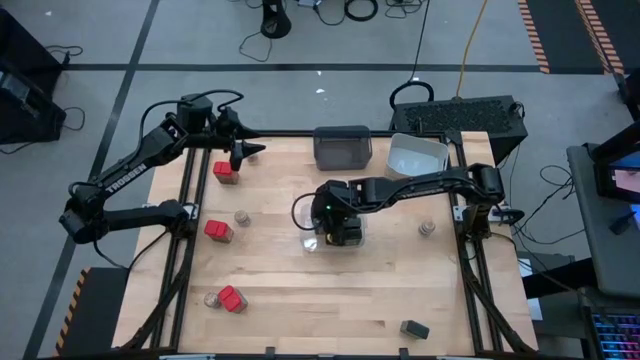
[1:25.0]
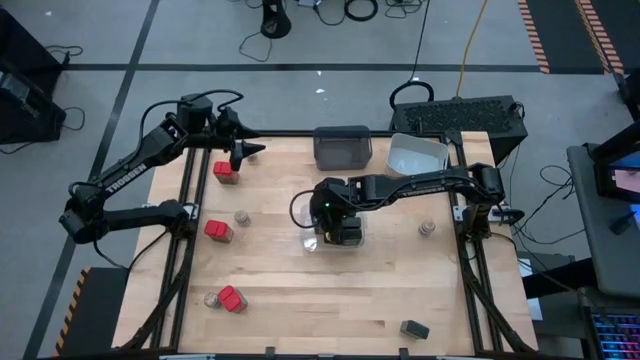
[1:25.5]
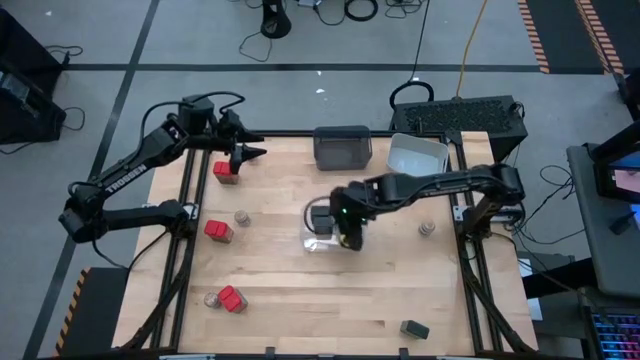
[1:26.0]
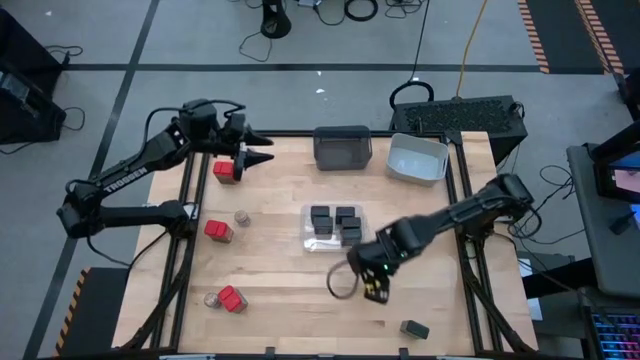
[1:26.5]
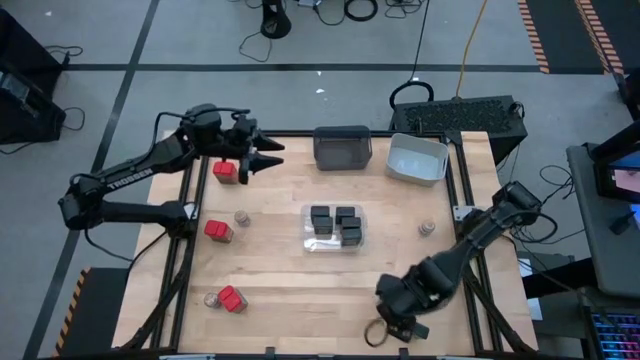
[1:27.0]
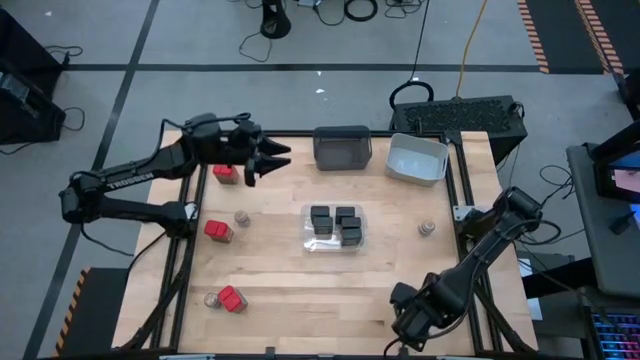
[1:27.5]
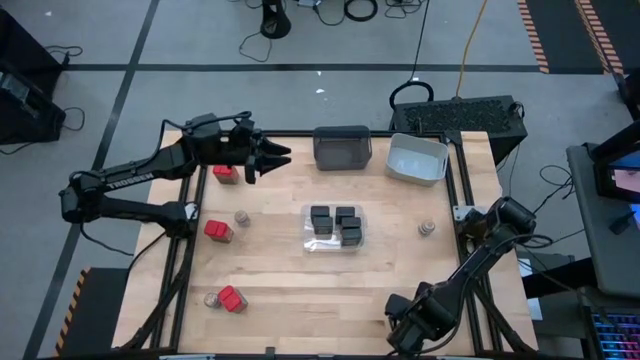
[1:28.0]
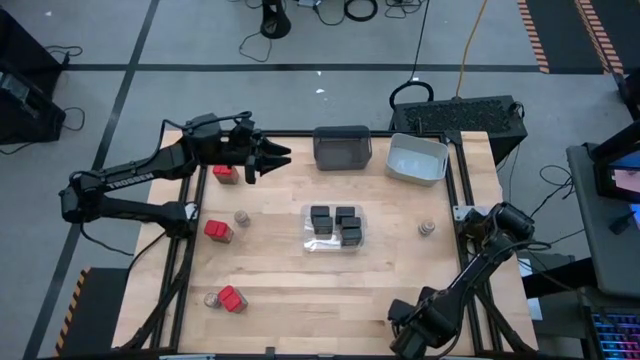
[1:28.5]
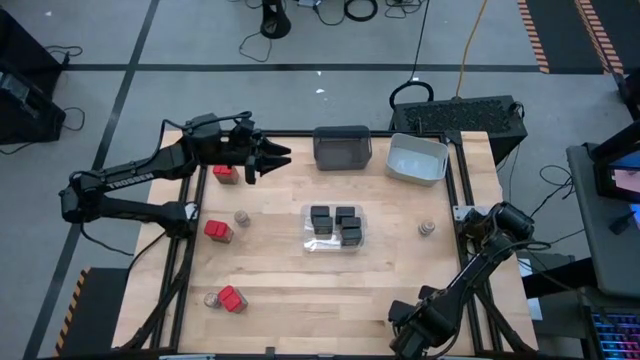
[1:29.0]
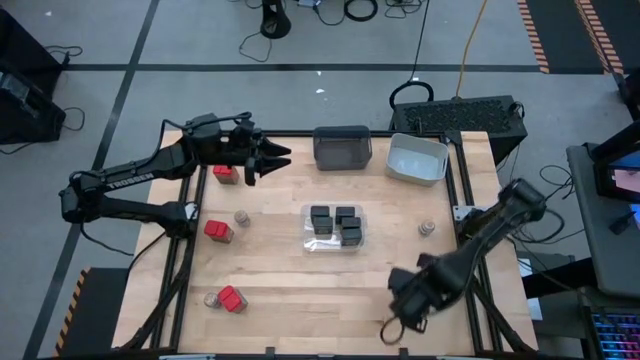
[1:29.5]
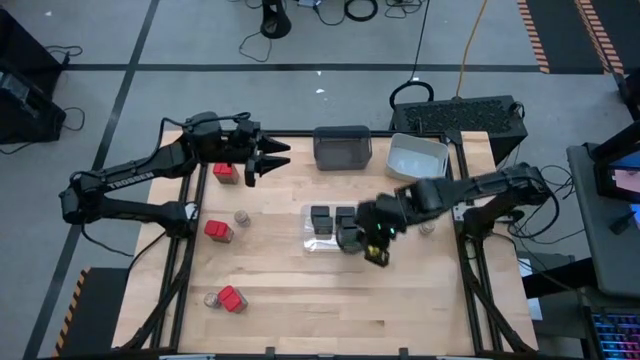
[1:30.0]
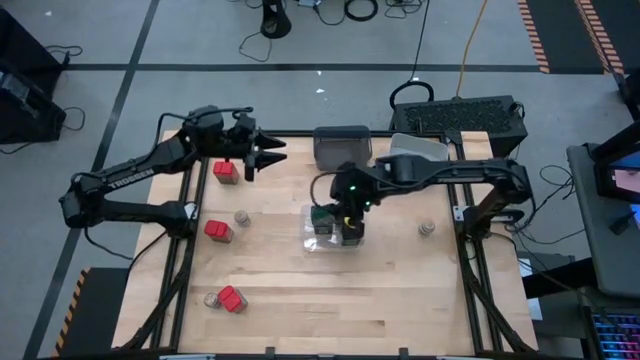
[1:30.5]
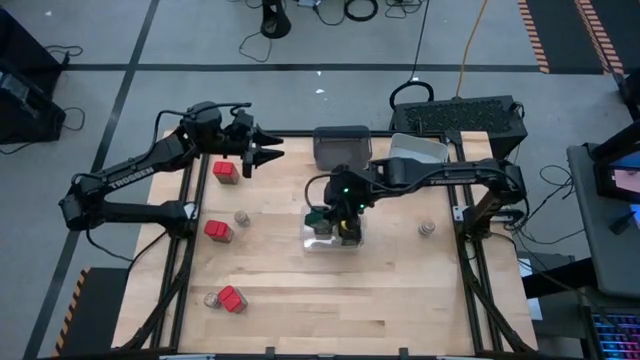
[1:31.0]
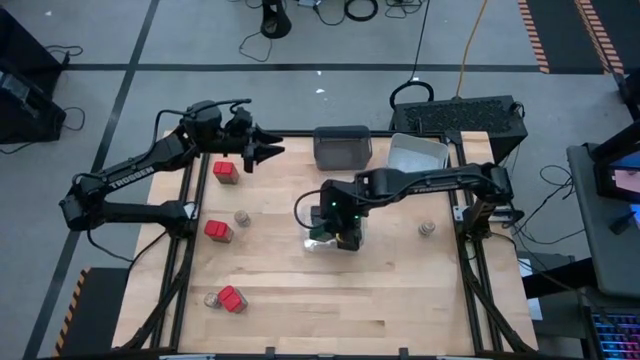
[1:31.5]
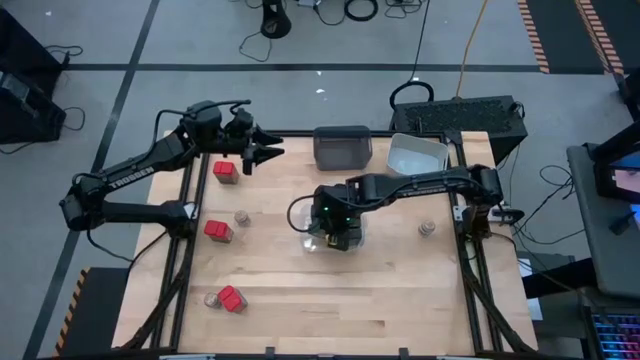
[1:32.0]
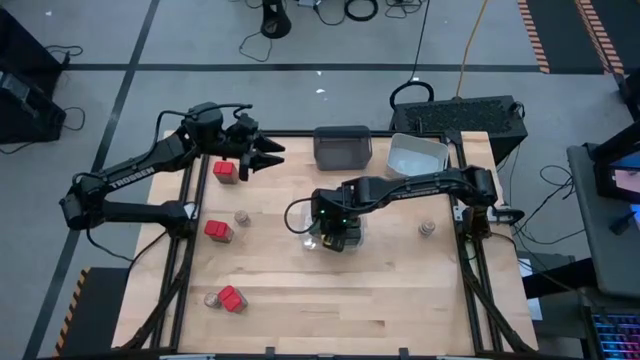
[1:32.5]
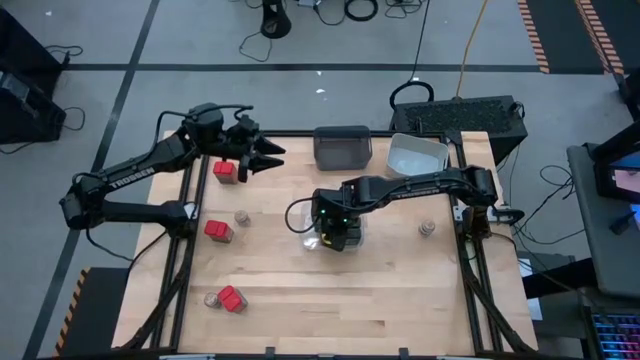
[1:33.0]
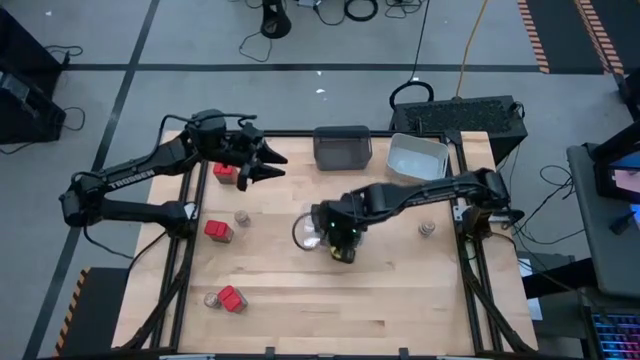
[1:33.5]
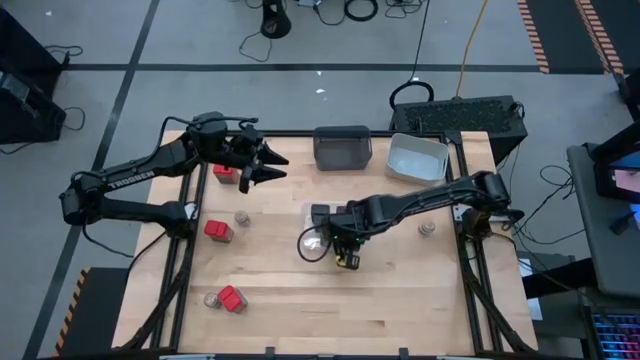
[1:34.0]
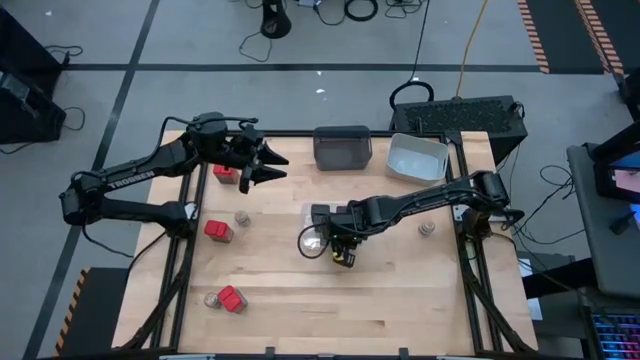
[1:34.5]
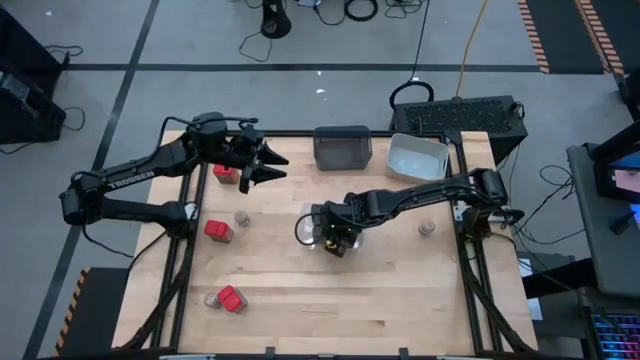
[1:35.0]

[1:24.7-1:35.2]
Task: Sort spices by type
Put the black seasoning can into the transparent bin

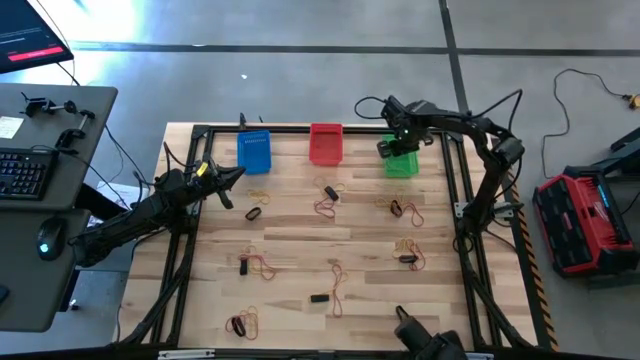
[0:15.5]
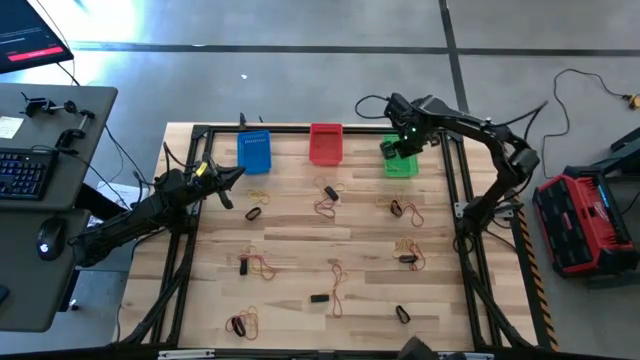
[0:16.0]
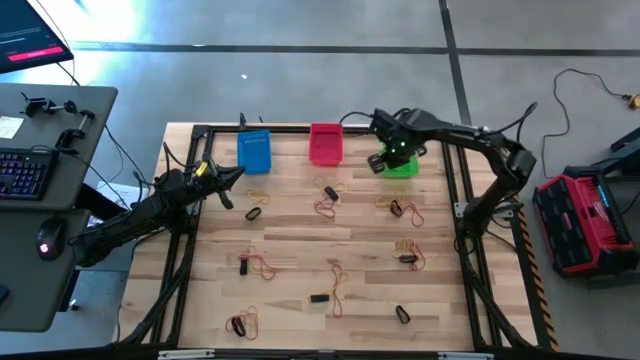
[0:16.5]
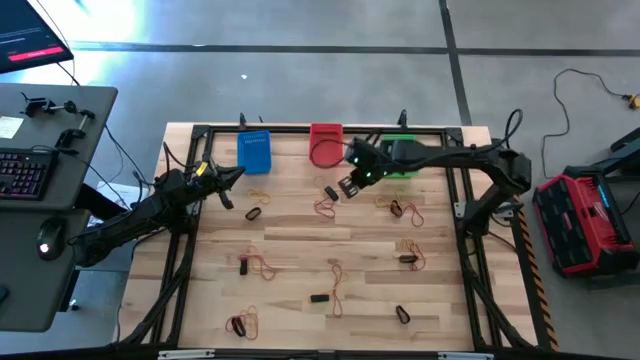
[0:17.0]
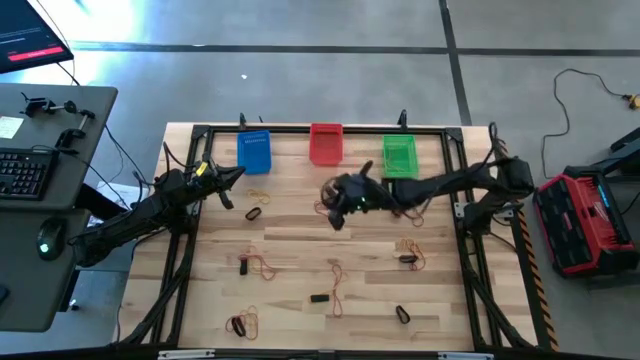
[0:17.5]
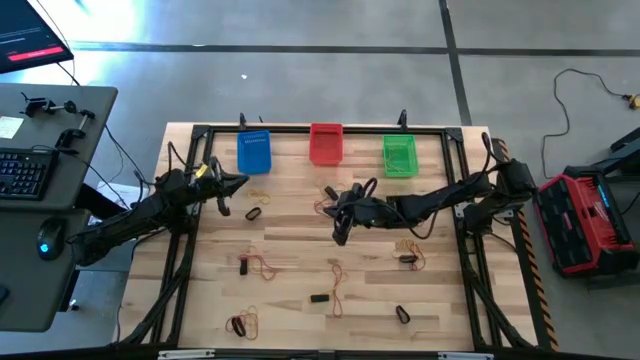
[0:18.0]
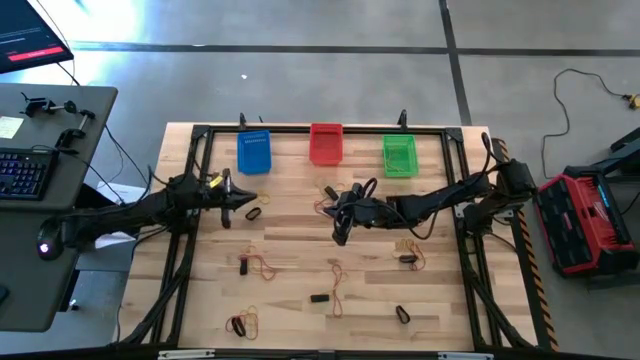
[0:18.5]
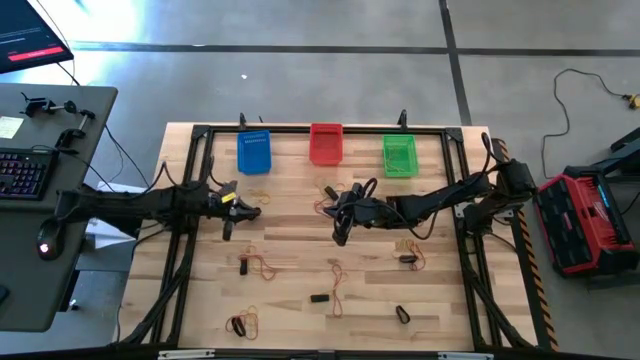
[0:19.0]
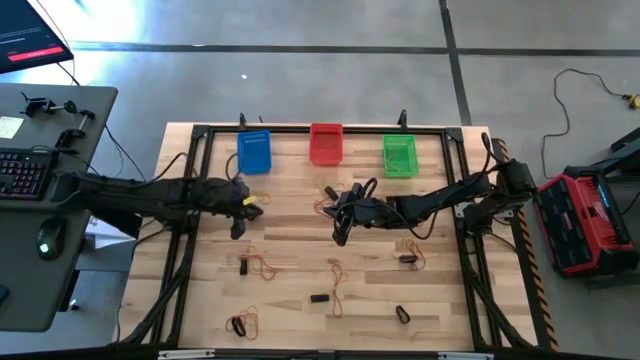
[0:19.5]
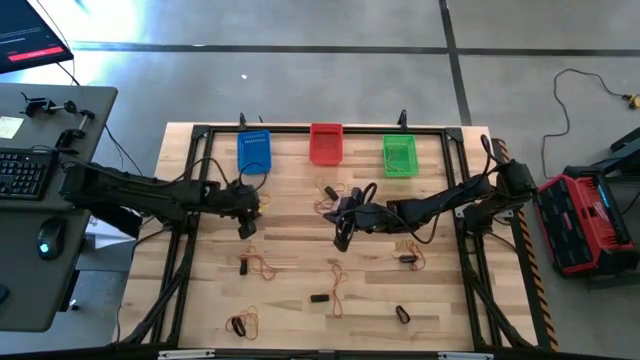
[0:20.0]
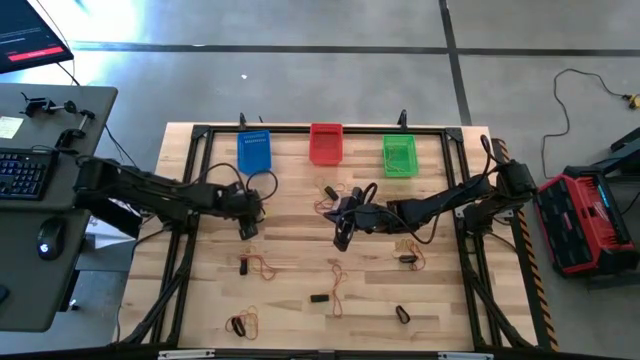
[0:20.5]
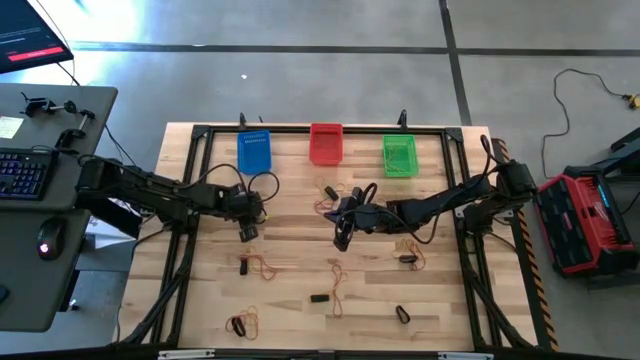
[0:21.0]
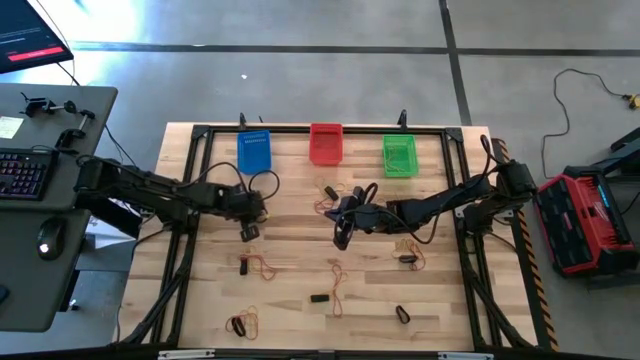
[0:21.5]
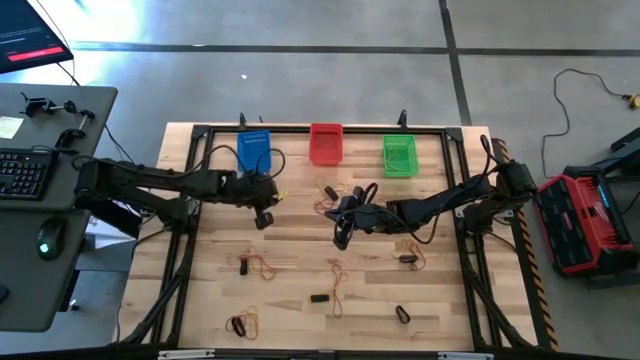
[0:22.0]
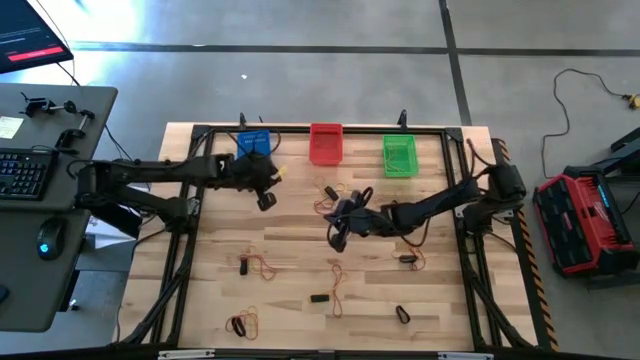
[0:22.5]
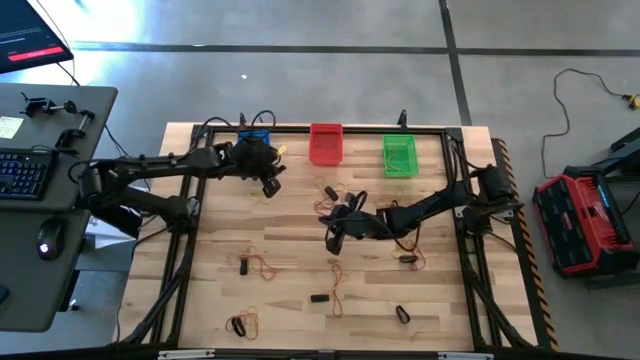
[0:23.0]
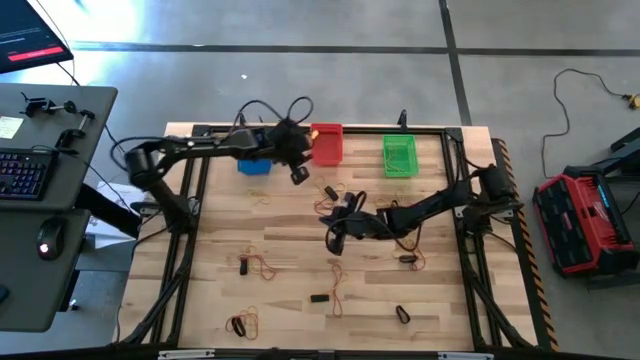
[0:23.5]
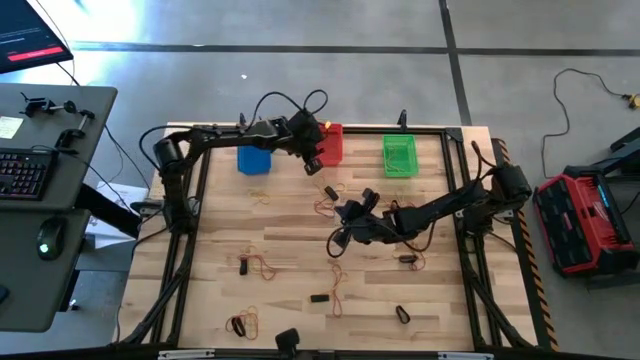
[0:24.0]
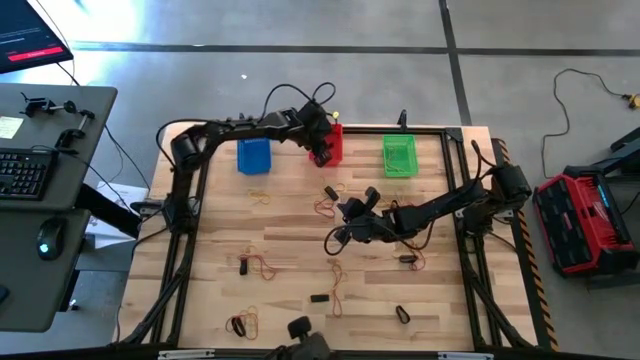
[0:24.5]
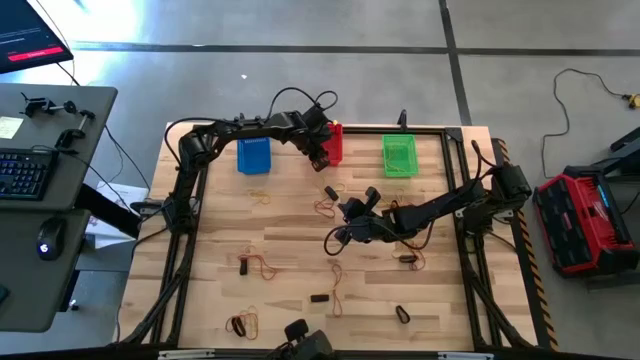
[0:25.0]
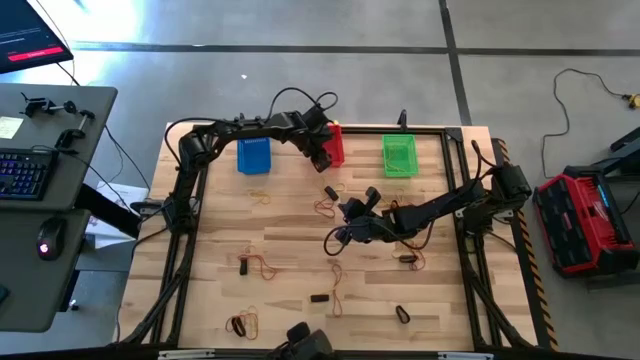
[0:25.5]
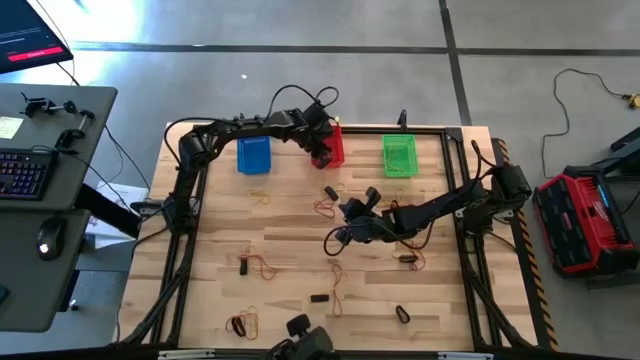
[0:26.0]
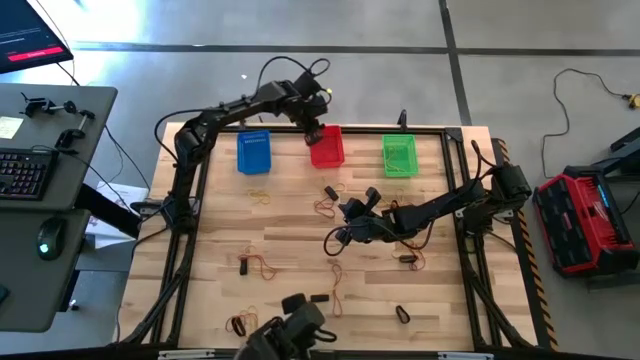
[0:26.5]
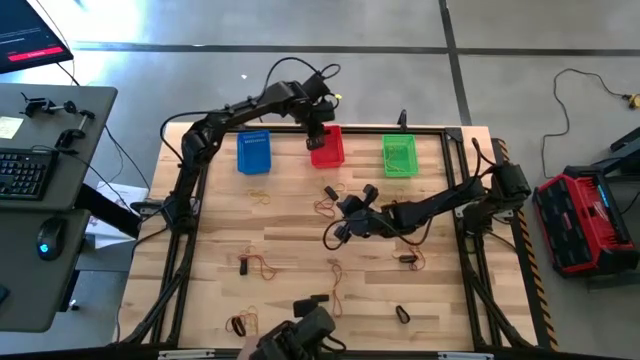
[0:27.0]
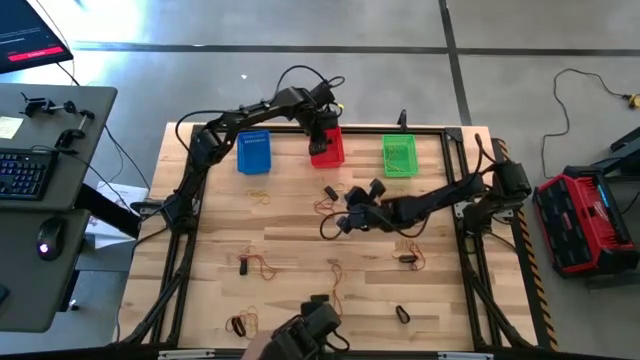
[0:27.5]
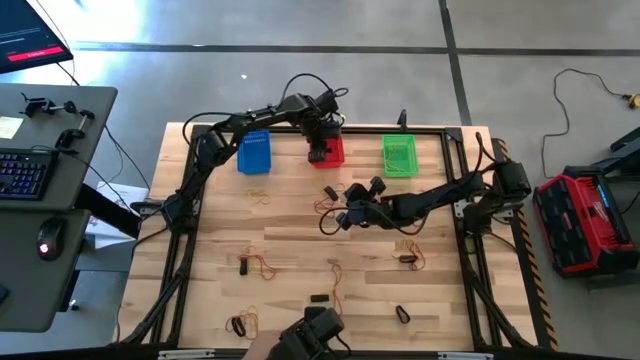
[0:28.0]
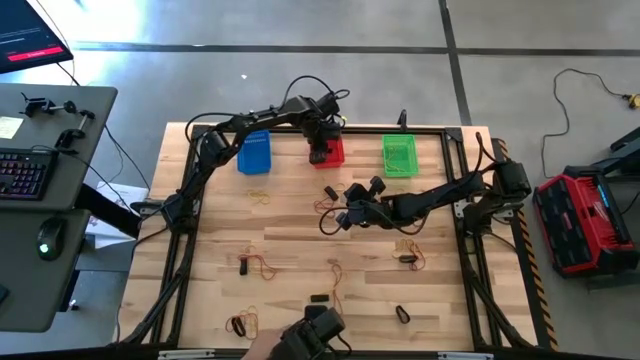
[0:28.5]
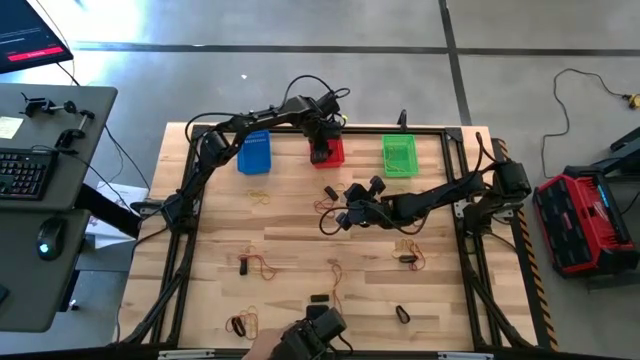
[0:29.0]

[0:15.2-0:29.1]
Task: Sort rubber bands into baskets
Put the black rubber band into the red bin
